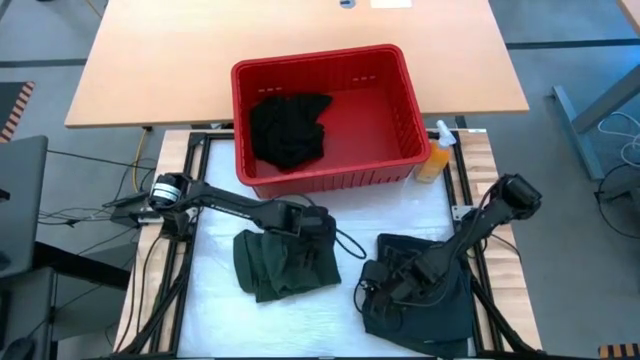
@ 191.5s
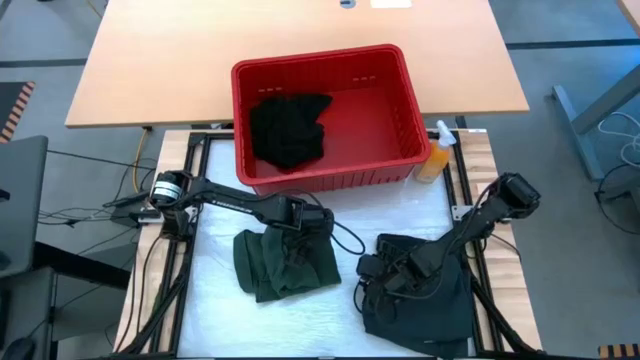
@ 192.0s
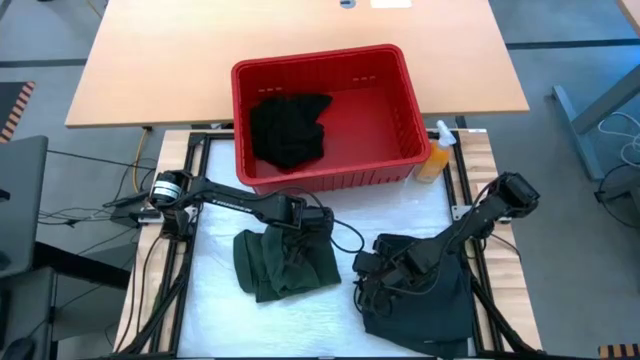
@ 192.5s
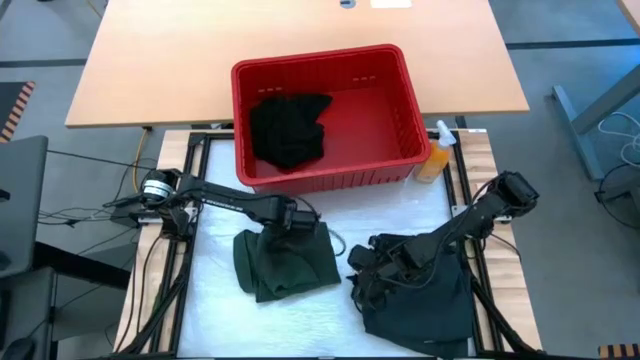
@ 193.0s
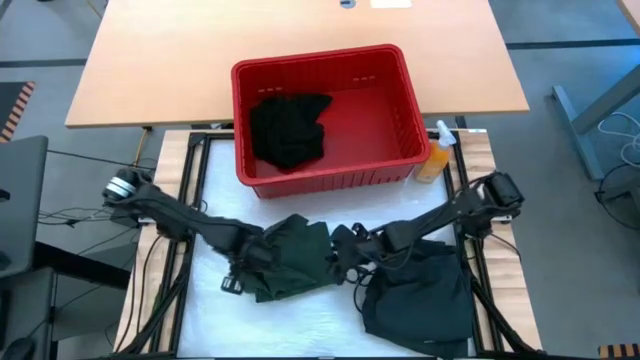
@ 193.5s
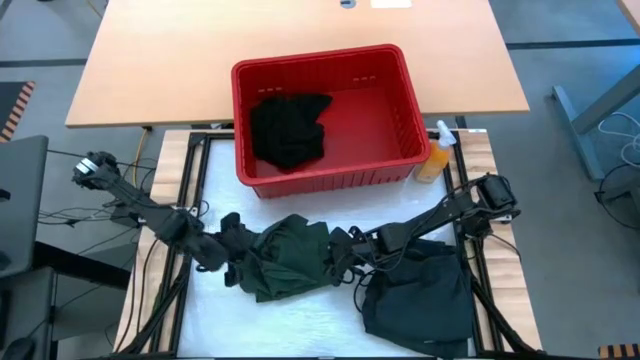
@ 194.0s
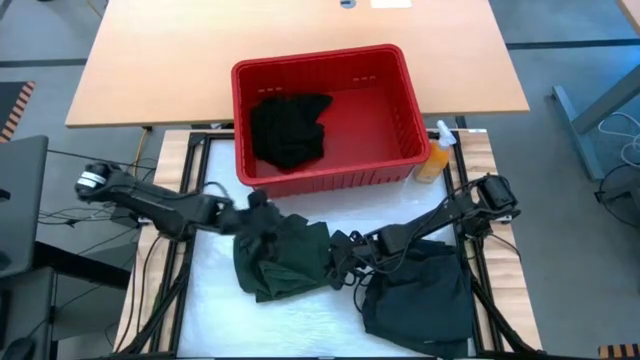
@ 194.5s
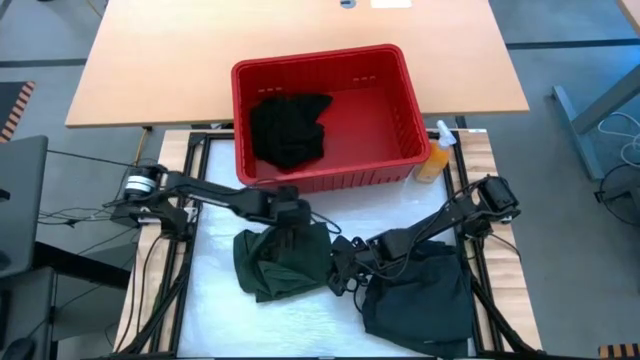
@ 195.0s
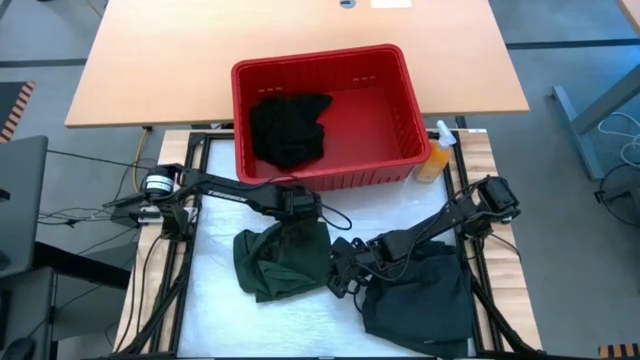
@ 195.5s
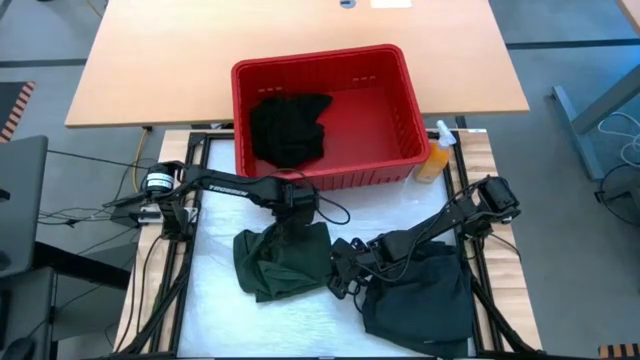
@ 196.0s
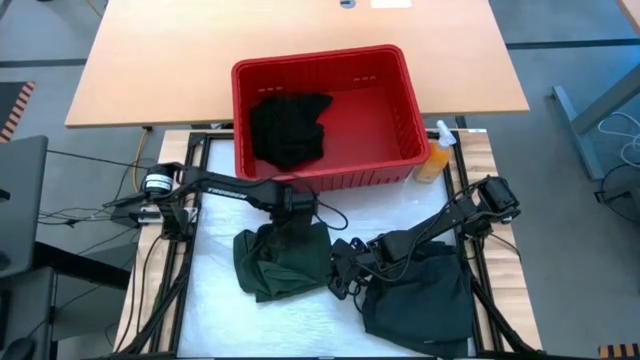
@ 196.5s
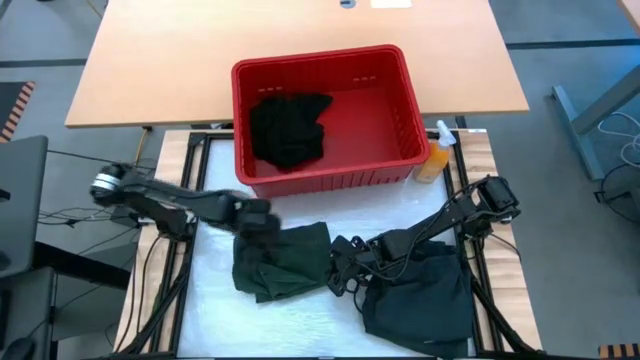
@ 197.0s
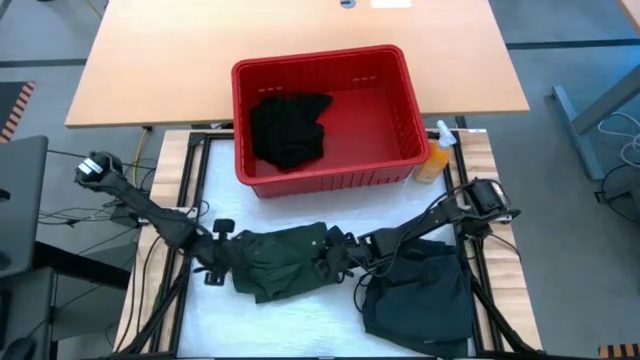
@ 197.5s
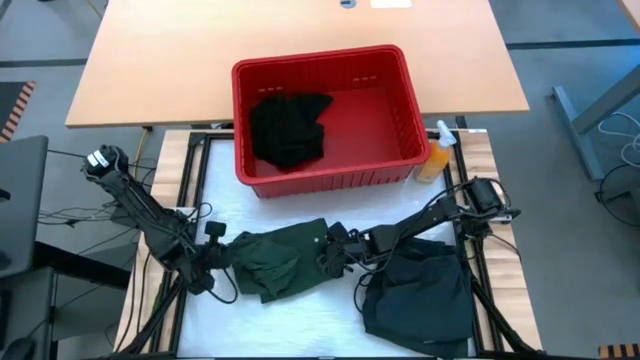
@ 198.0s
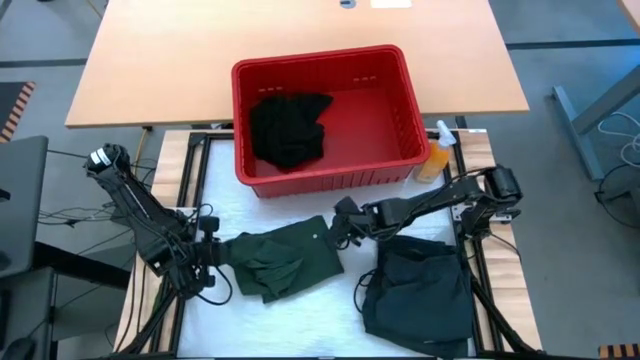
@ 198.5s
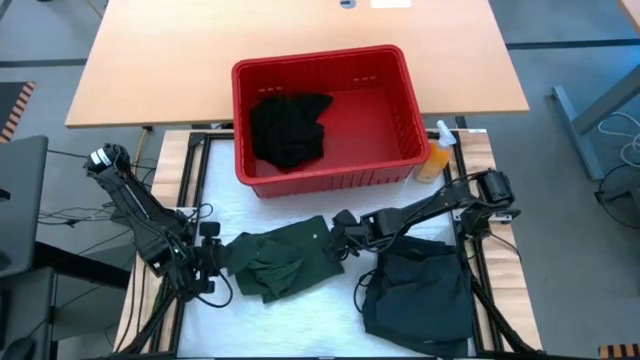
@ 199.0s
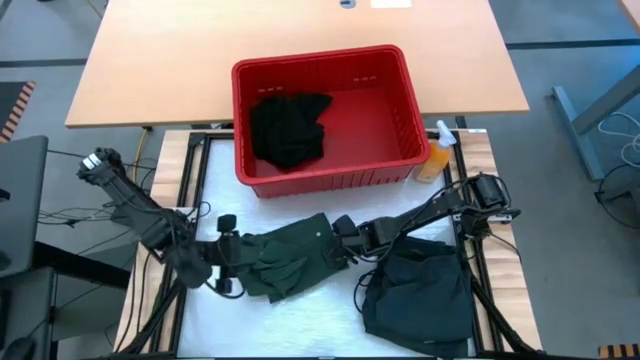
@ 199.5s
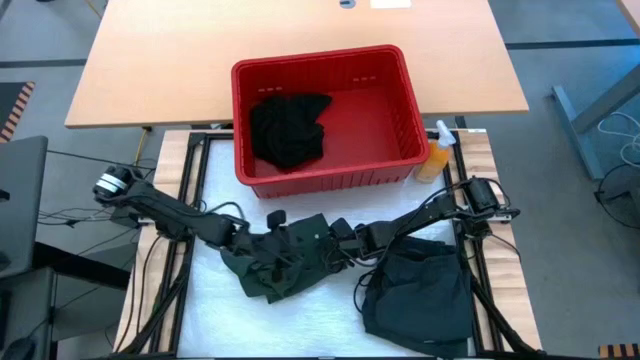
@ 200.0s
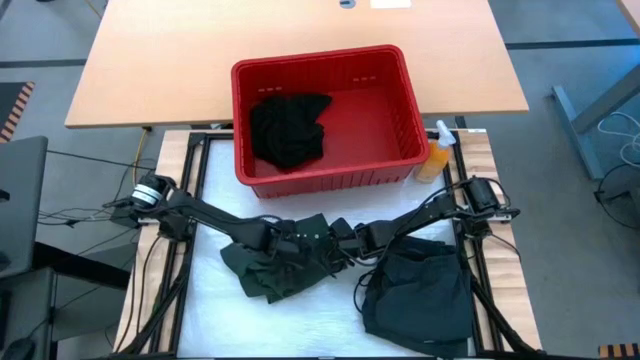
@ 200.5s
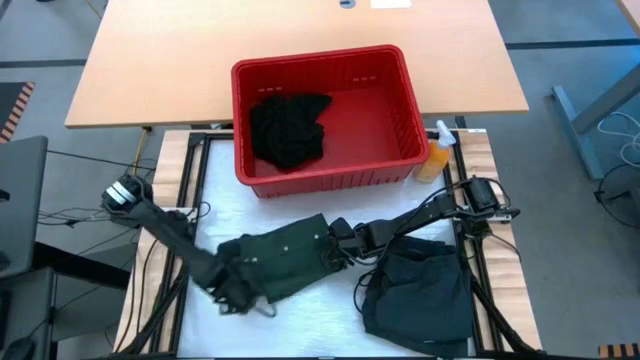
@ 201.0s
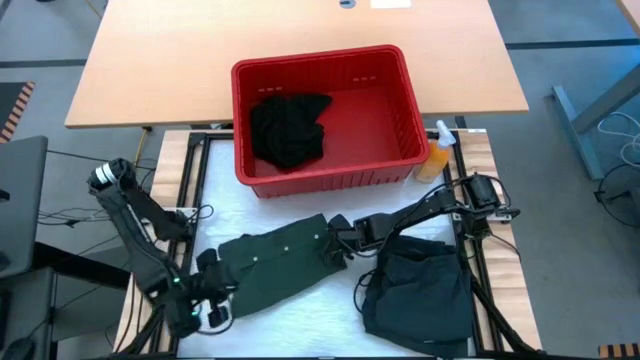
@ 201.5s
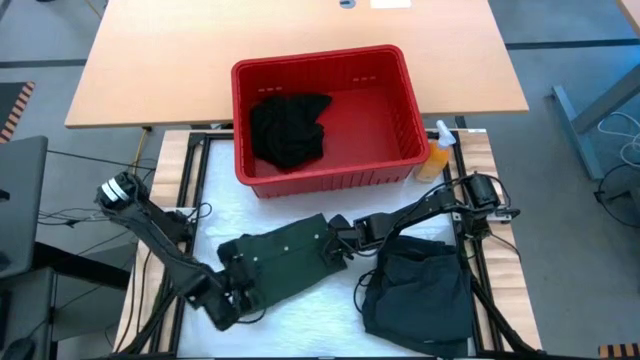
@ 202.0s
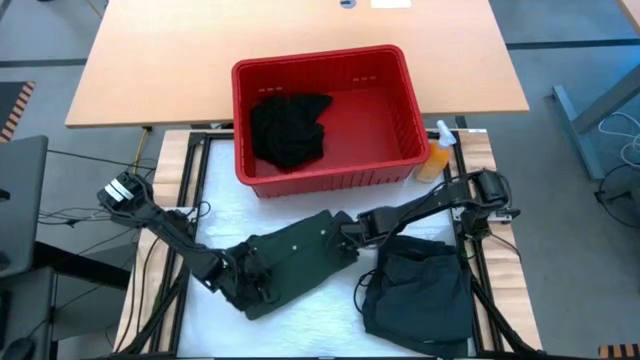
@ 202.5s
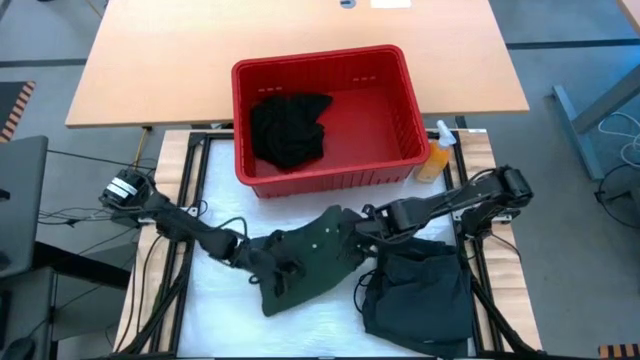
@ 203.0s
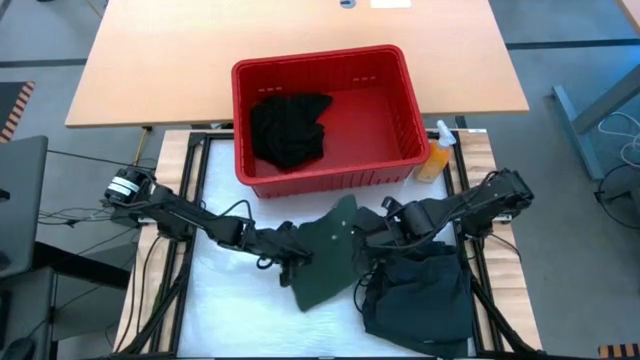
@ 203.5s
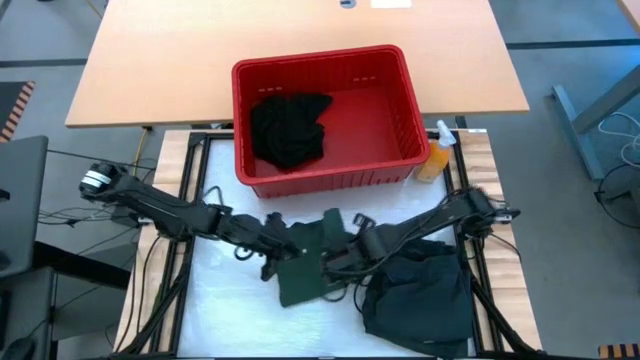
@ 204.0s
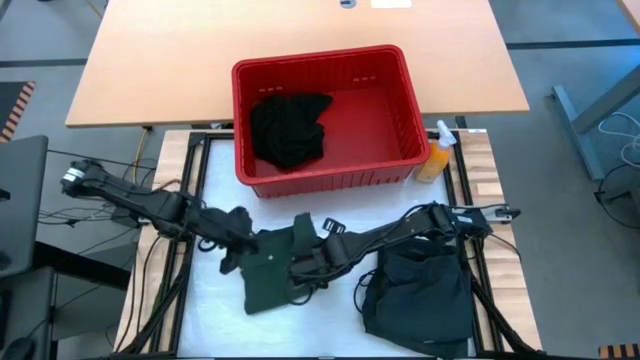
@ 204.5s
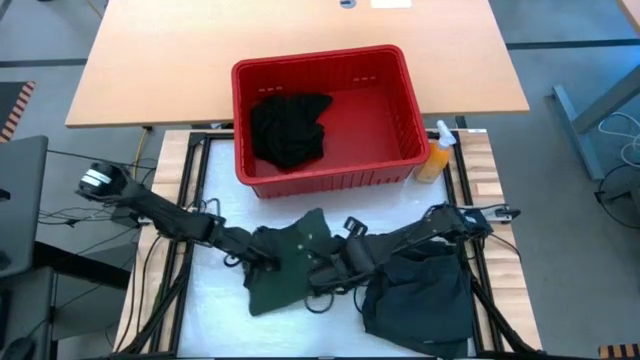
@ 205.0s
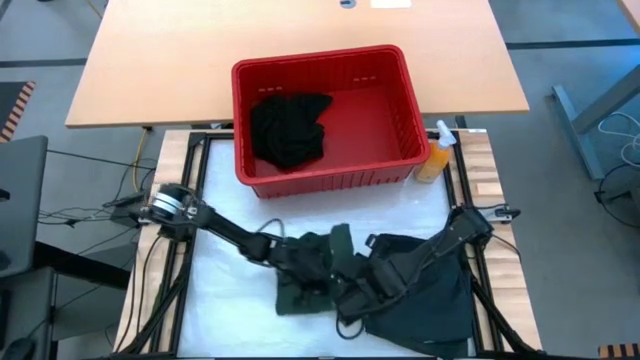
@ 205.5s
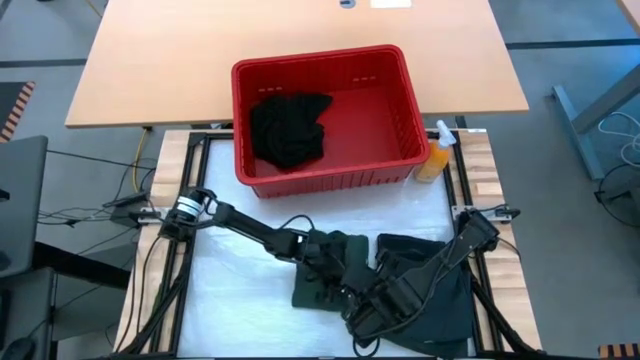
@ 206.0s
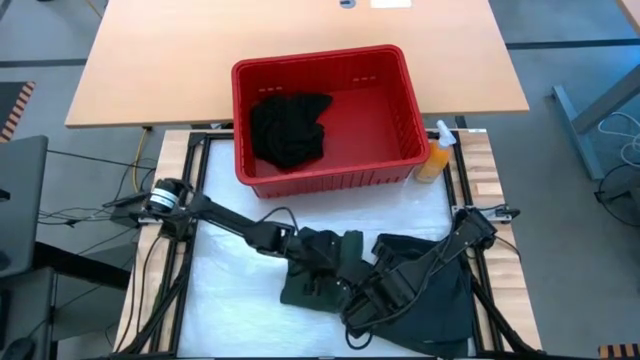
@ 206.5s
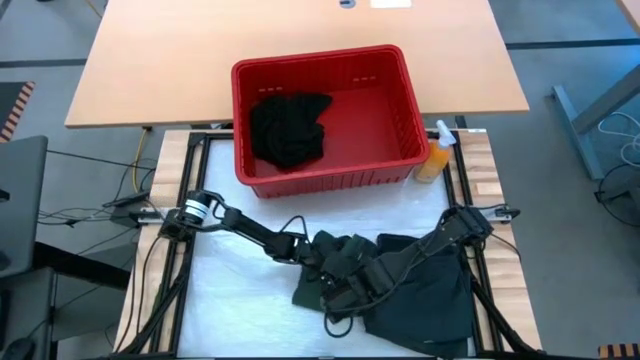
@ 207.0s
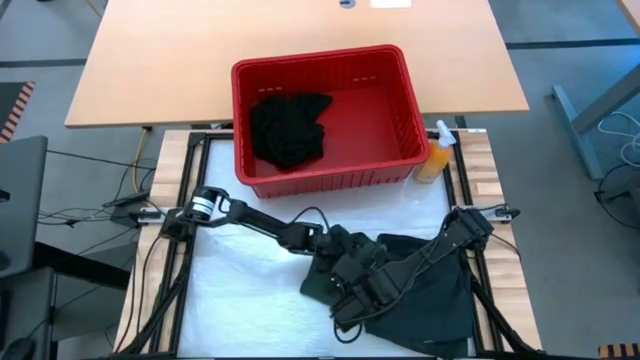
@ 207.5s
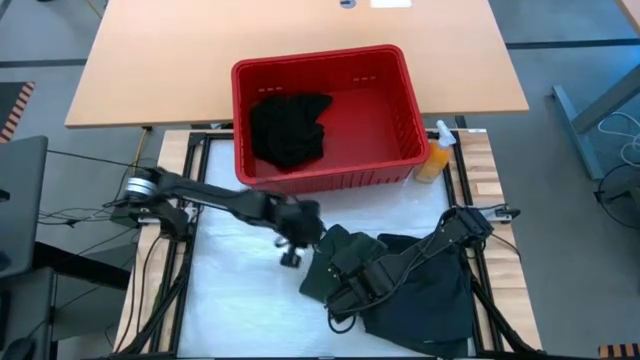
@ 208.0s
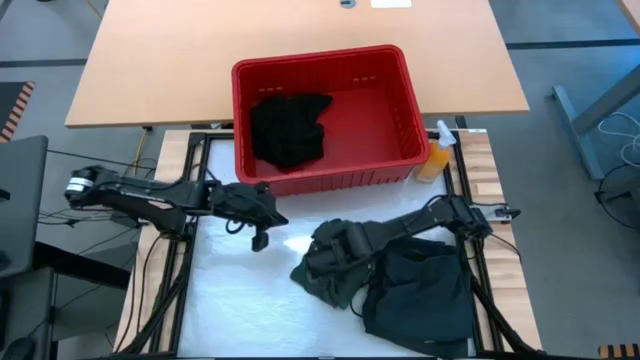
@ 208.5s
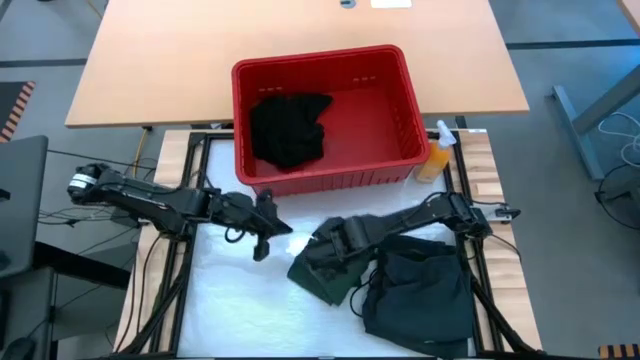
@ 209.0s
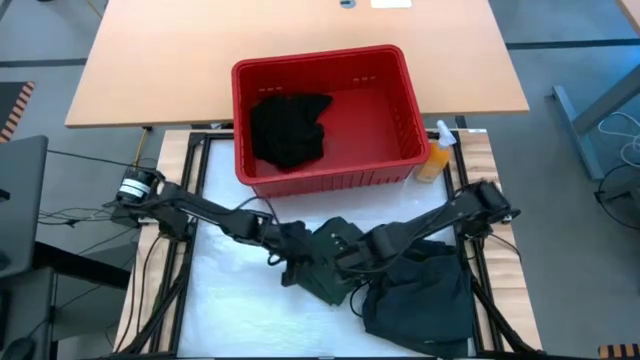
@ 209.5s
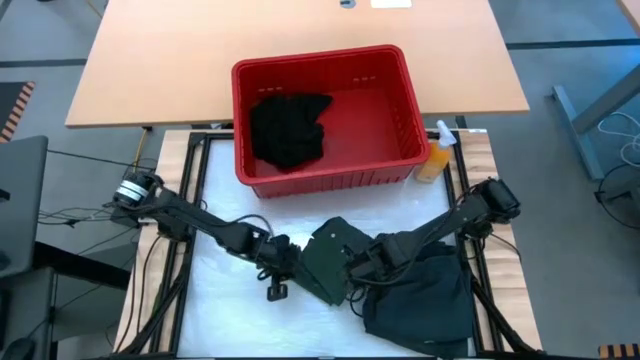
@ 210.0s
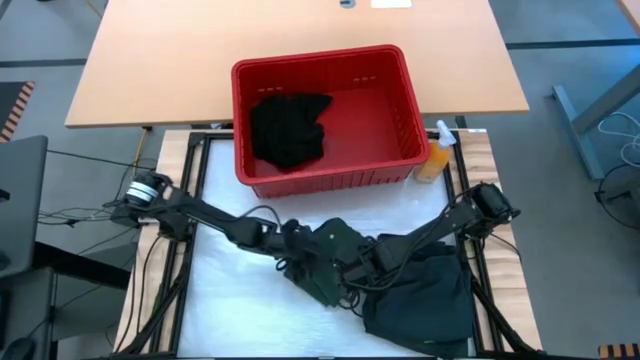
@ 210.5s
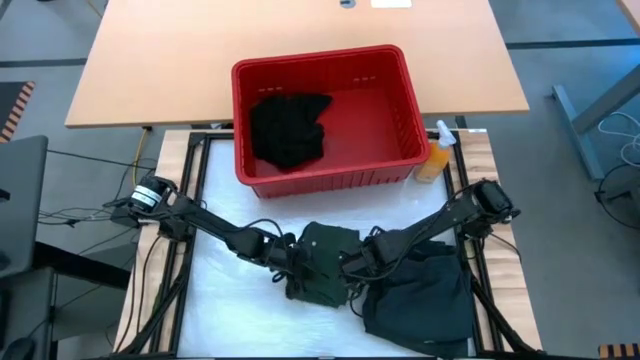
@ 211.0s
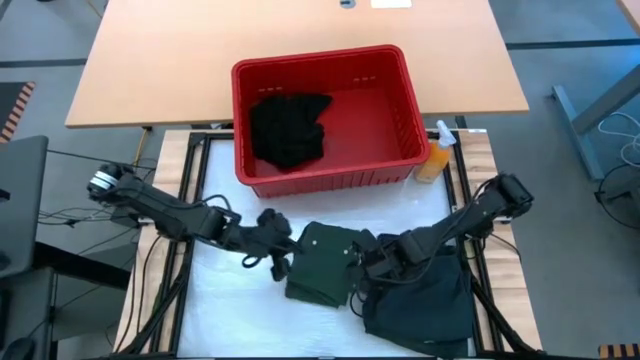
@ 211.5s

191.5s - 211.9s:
Task: Fold laundry
Fold the green shirt
